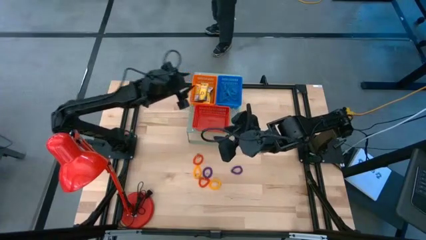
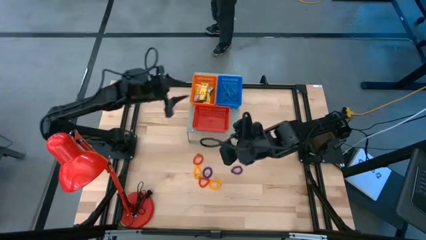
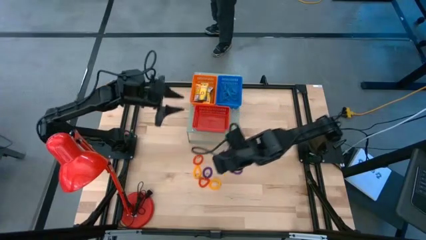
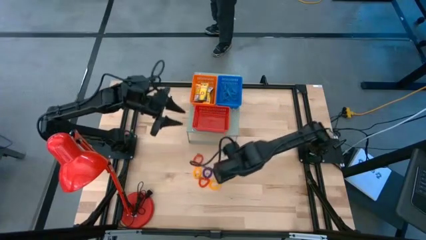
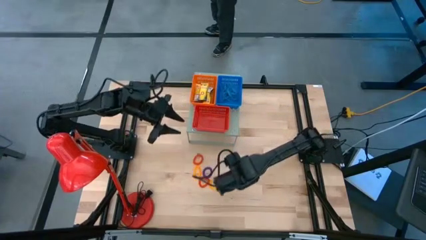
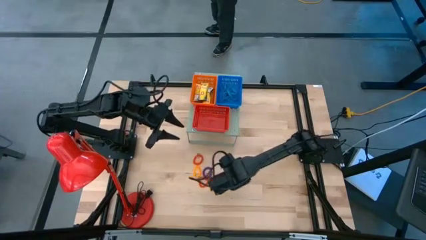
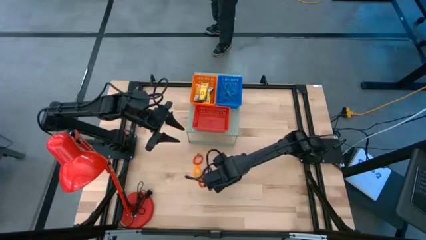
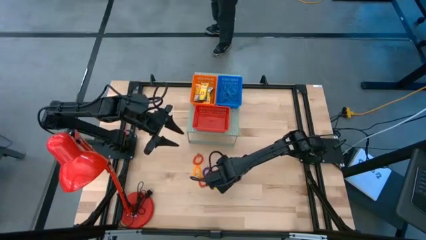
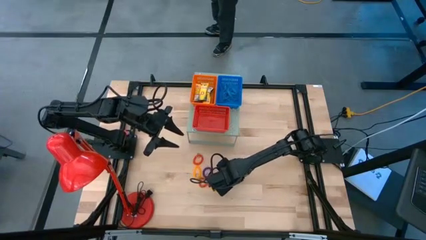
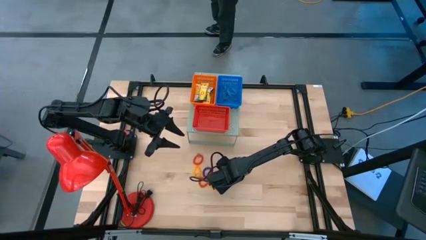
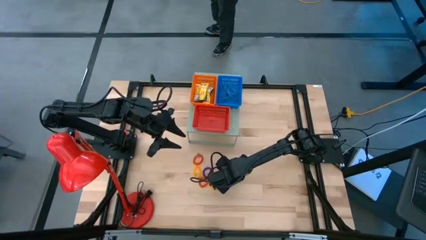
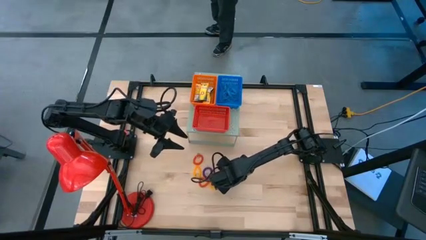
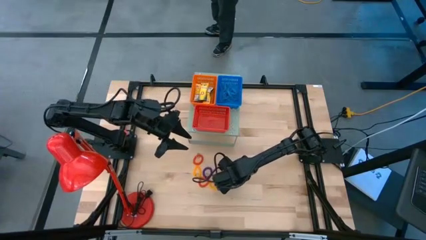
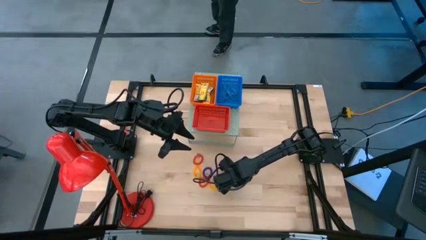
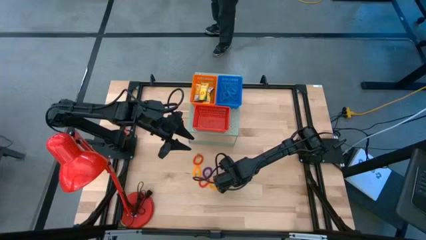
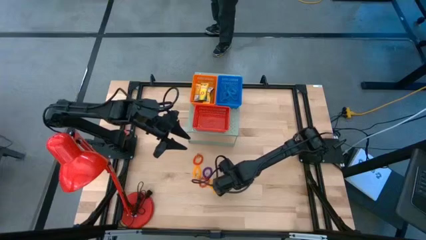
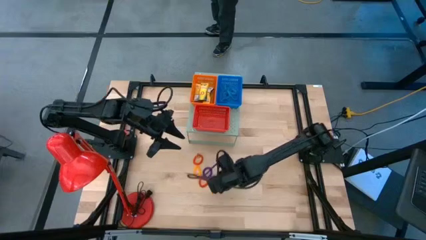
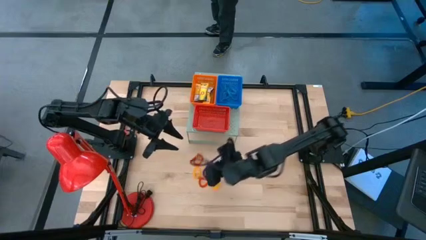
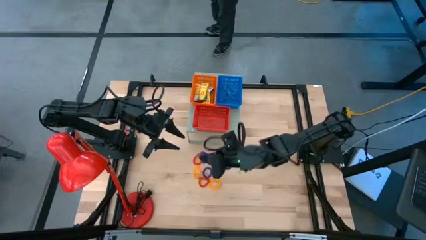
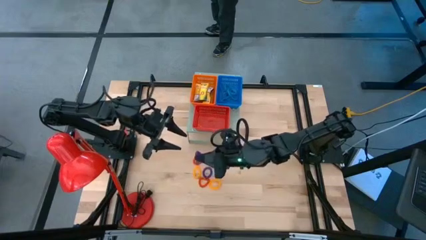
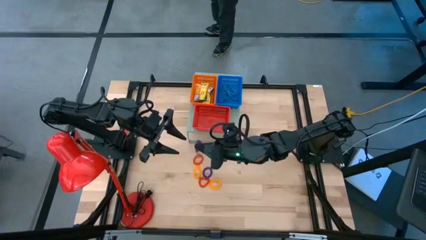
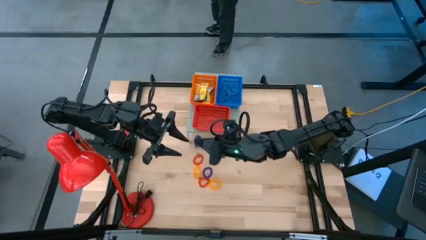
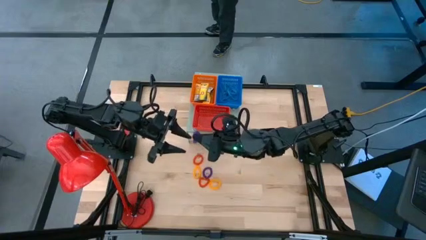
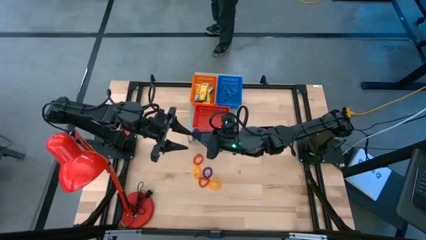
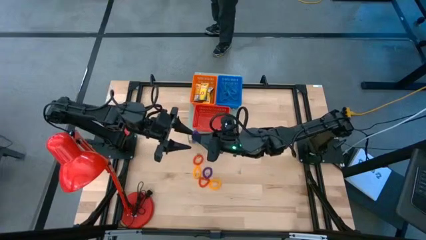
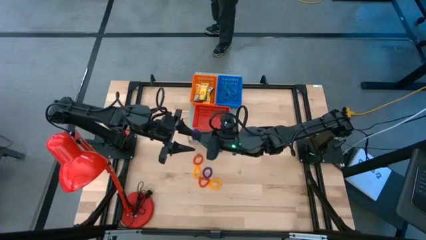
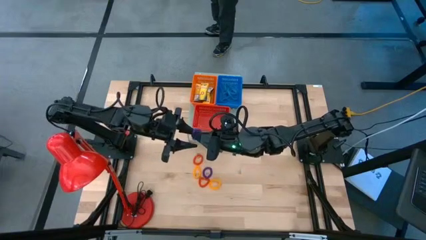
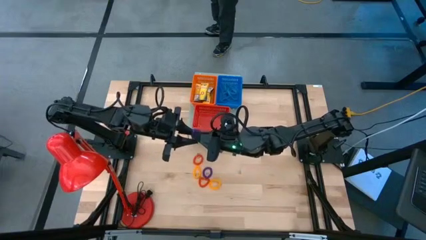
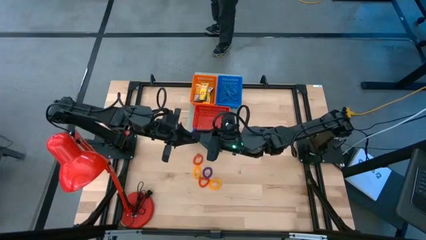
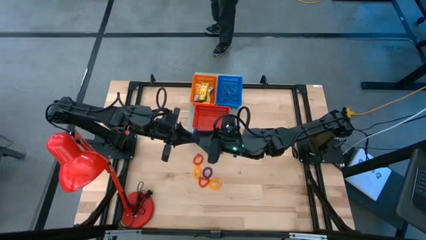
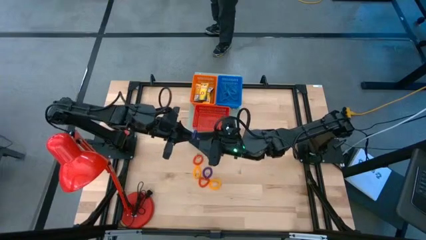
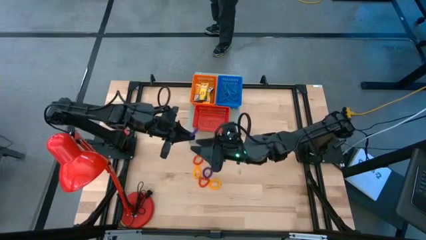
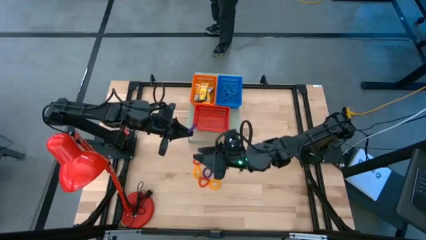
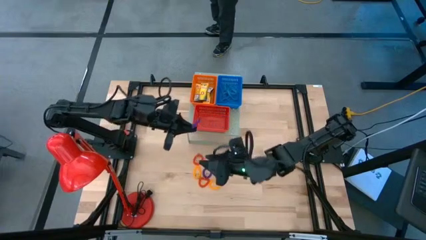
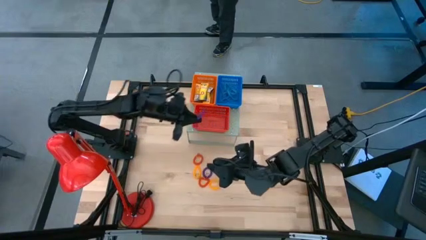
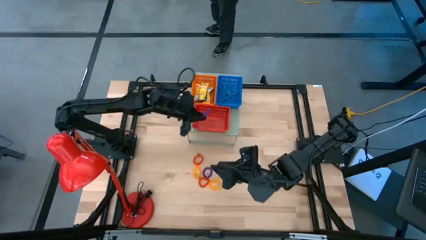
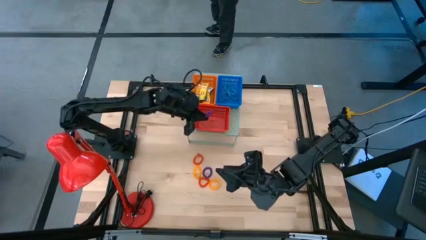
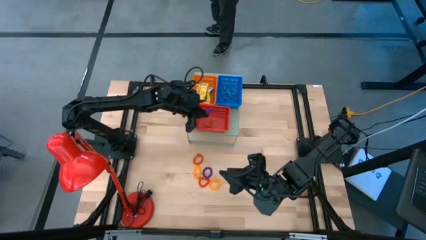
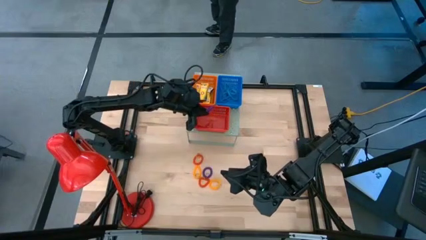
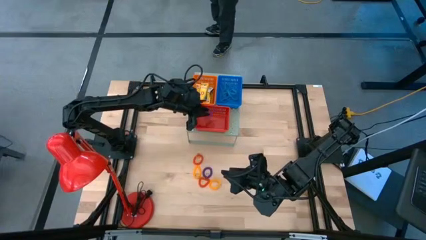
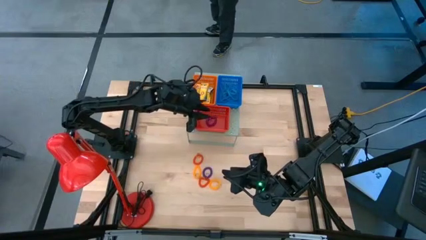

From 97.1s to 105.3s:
Task: Pick & Place Office Desk Supplies
Put the violet spring keychain into the red bin

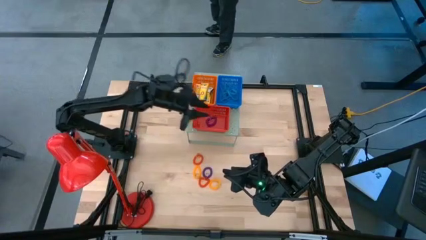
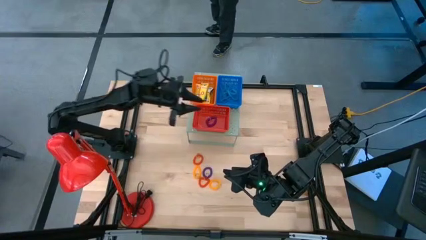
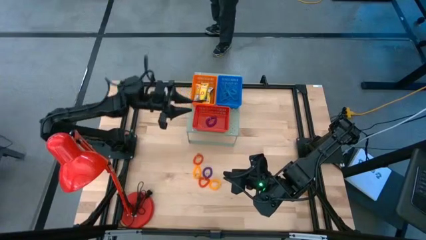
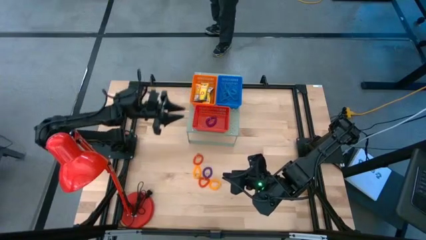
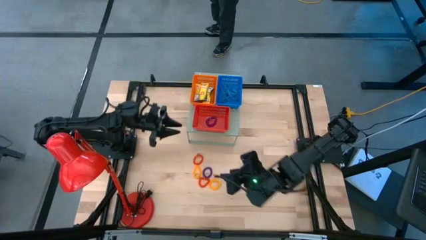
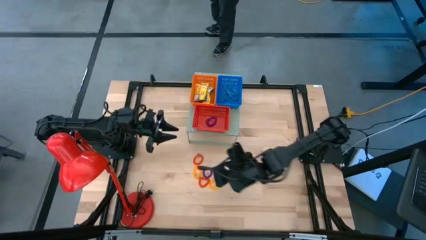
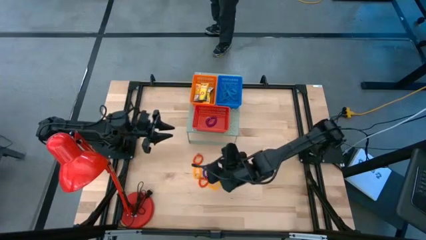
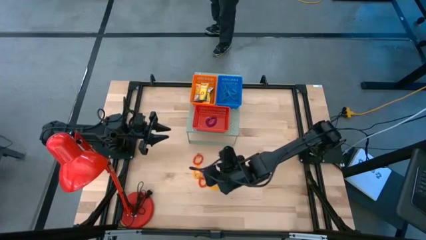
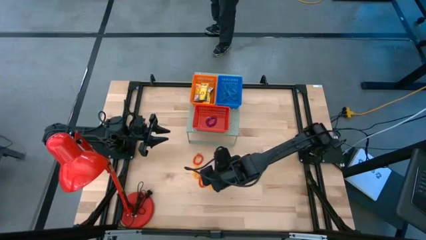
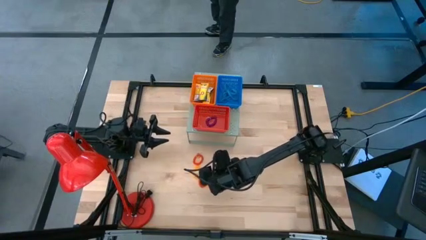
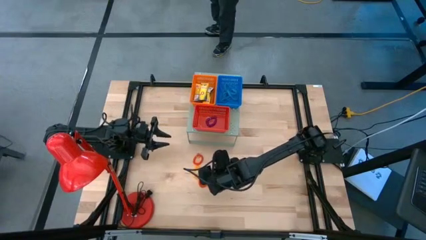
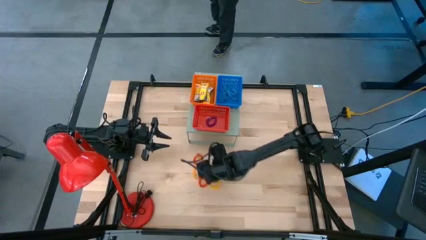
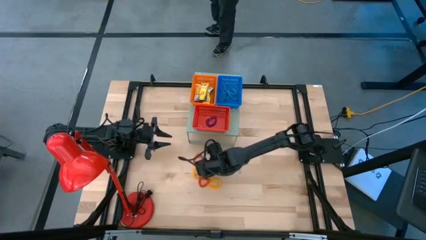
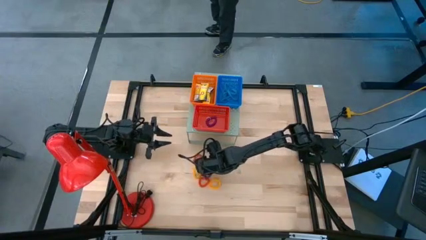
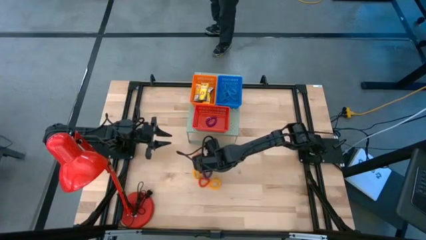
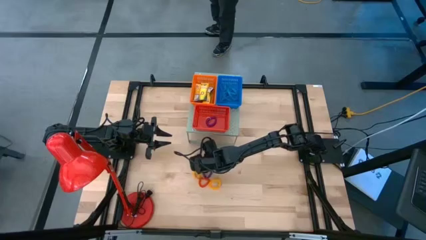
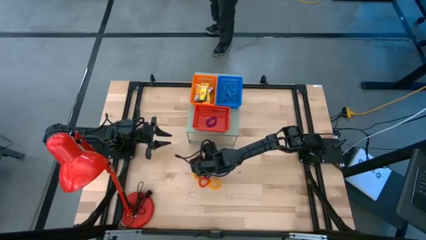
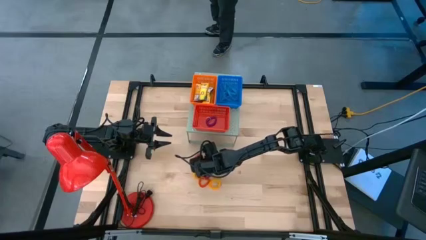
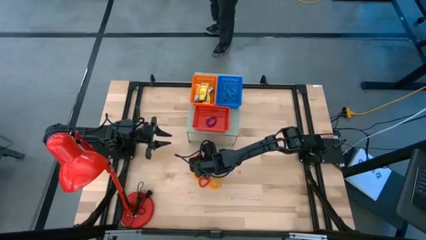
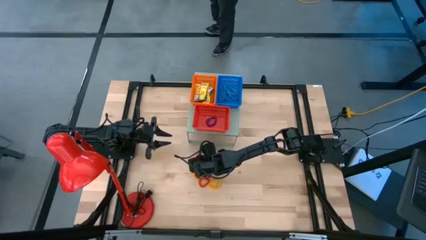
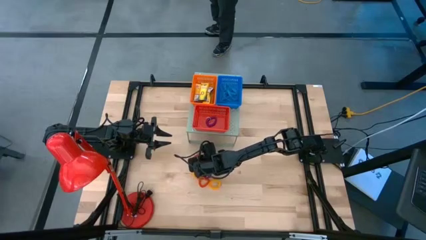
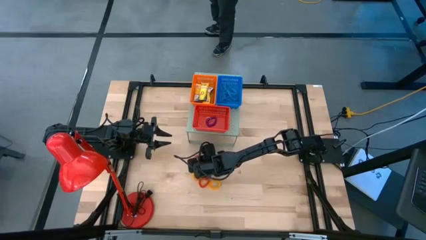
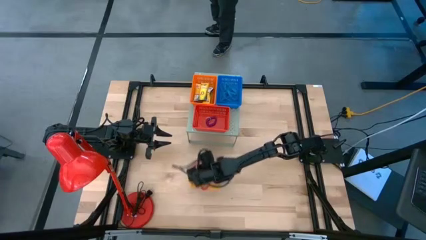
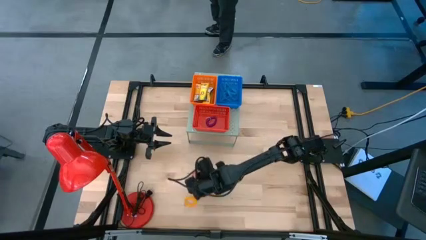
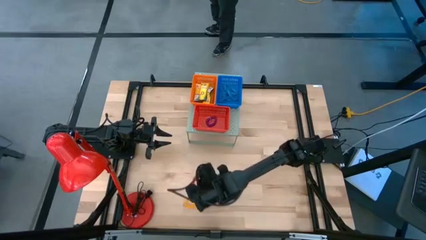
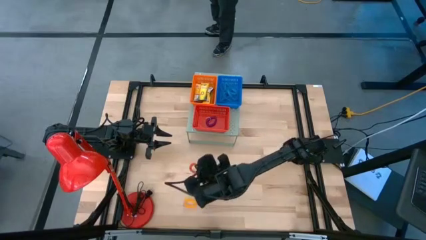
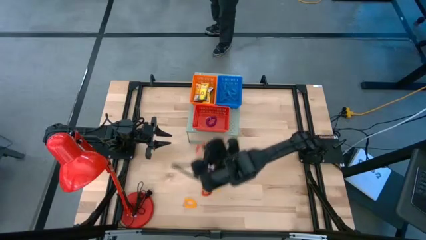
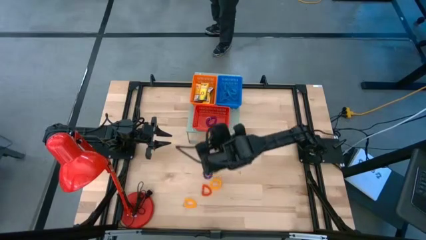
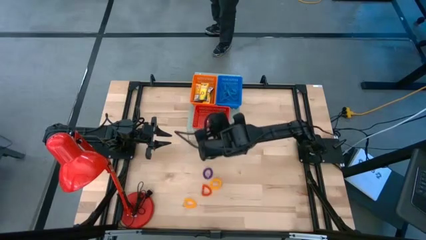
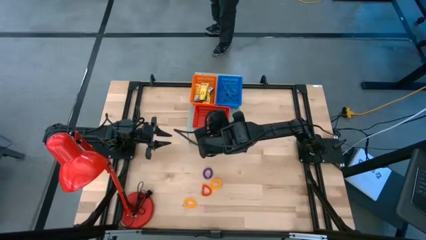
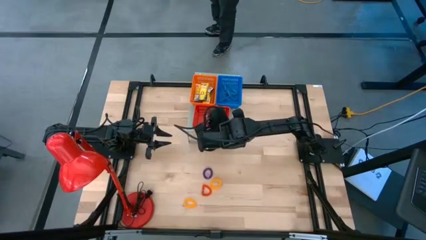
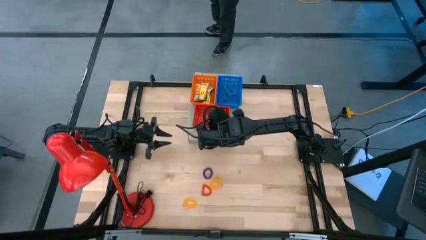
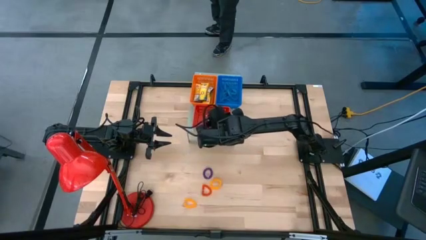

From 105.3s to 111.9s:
Put the orange spring keychain into the red bin
